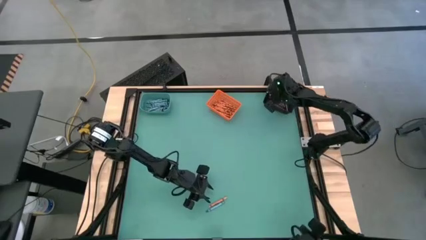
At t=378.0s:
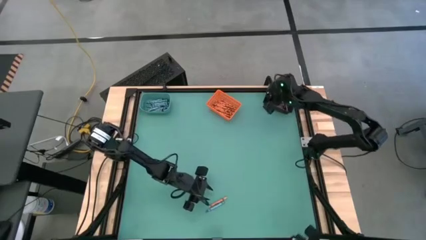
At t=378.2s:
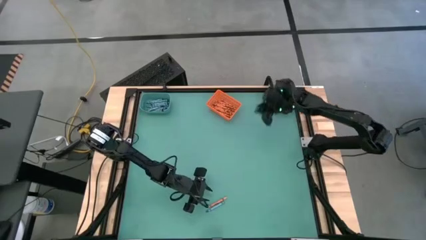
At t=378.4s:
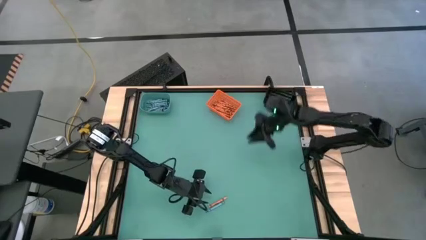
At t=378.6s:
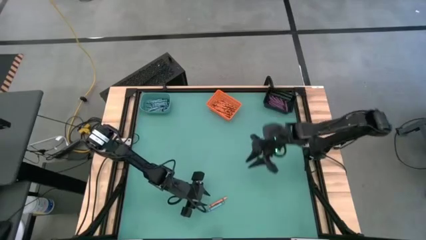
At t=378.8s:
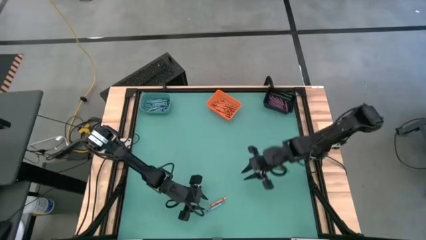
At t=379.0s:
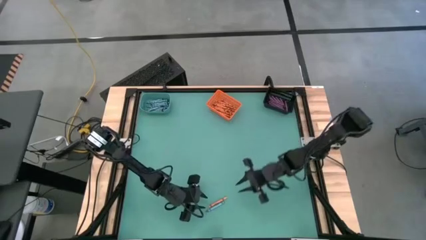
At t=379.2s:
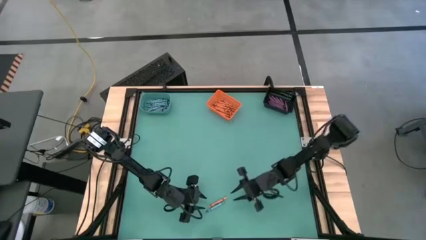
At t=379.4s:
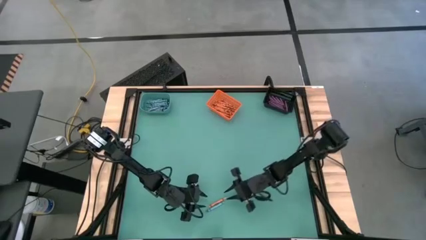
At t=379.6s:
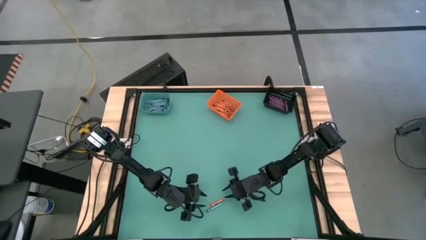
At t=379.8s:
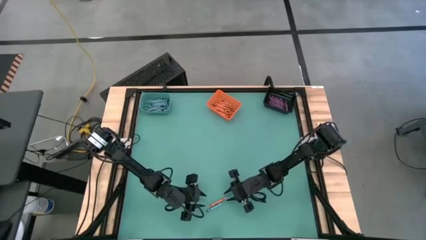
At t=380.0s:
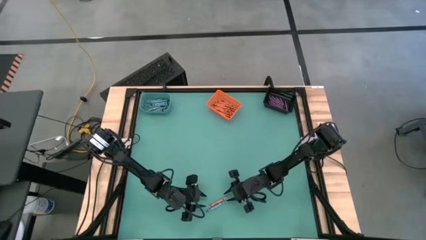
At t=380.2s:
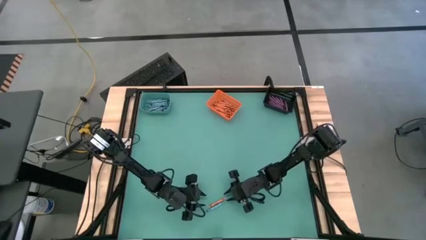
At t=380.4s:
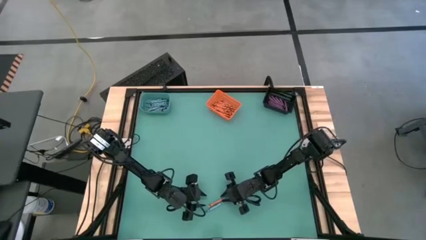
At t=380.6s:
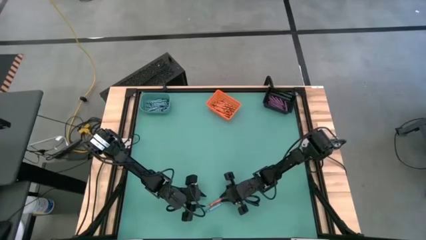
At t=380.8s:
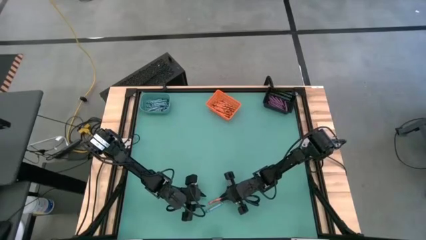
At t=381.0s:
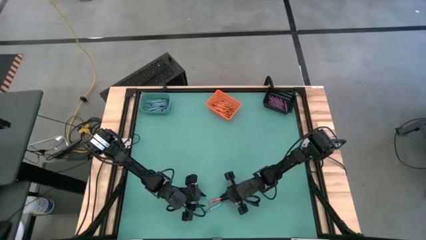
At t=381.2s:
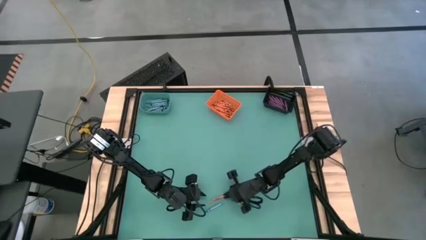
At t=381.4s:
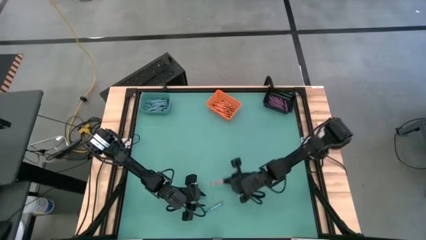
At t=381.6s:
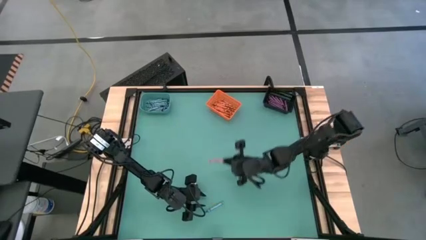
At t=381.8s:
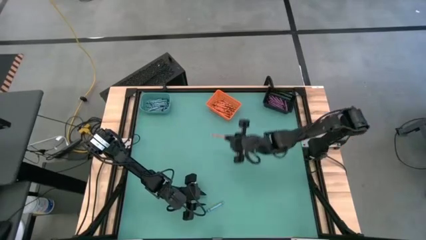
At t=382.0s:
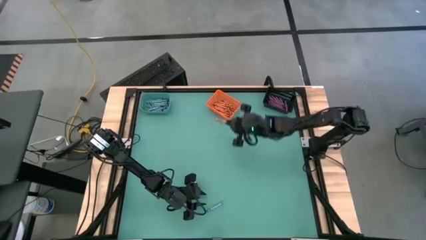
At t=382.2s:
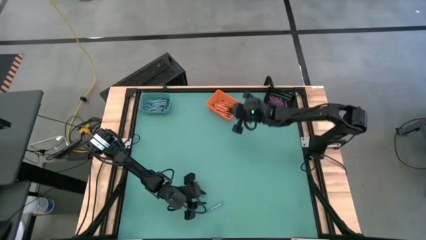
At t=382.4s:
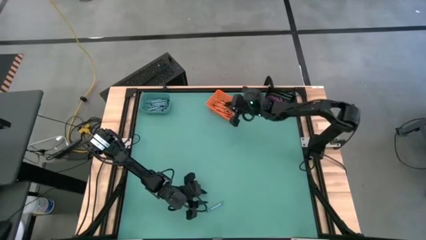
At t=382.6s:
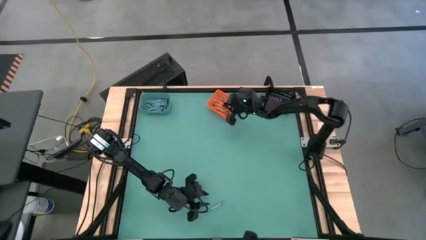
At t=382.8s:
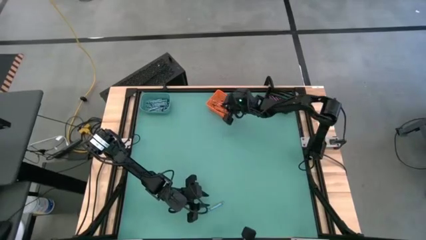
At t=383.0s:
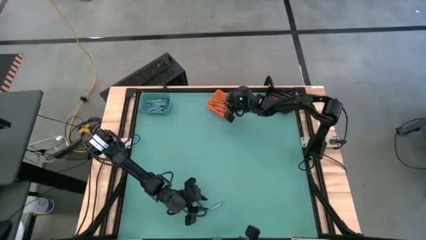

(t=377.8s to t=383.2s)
Task: Sort crayons
Put the orange crayon into the orange bin

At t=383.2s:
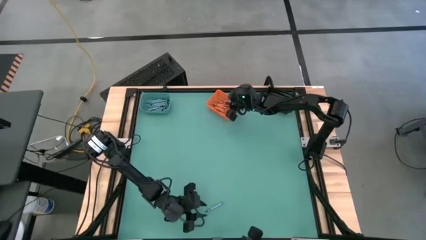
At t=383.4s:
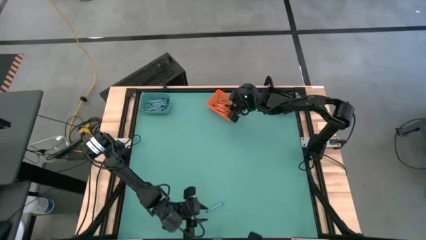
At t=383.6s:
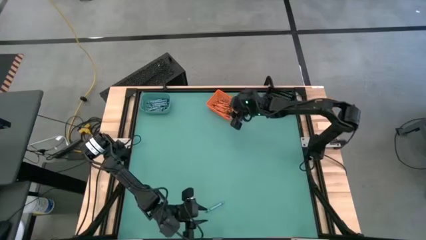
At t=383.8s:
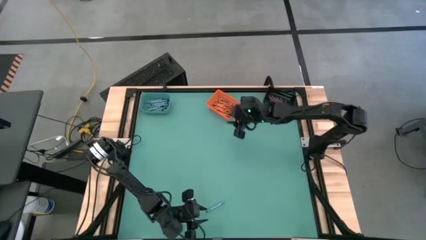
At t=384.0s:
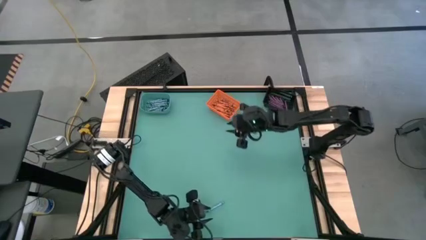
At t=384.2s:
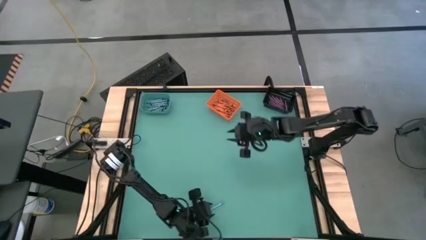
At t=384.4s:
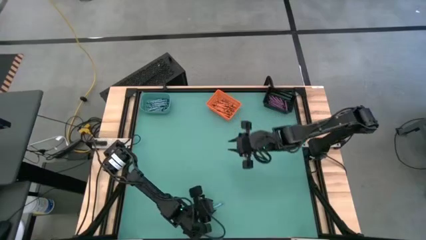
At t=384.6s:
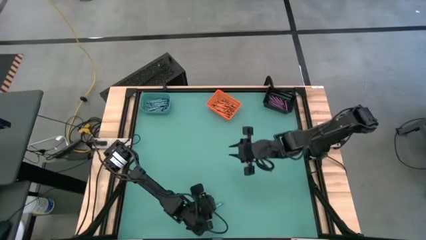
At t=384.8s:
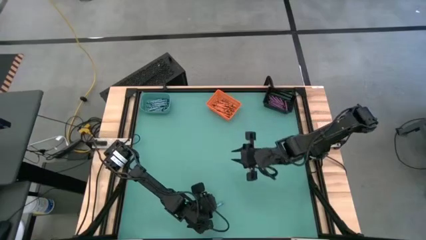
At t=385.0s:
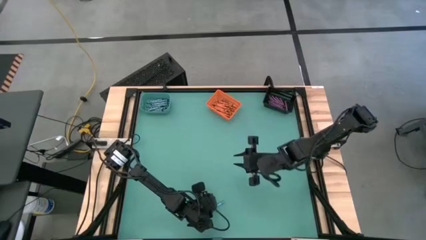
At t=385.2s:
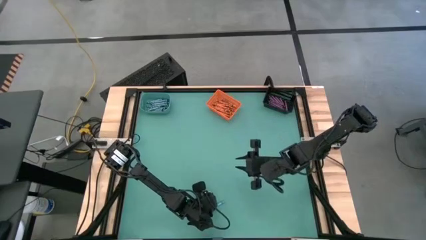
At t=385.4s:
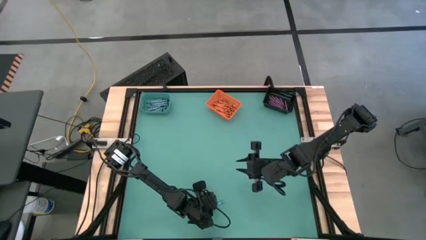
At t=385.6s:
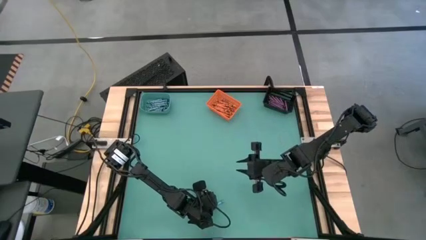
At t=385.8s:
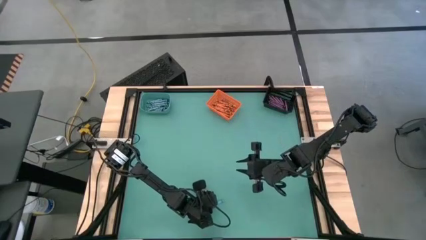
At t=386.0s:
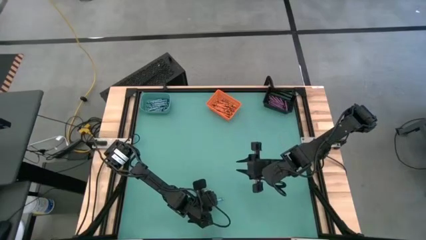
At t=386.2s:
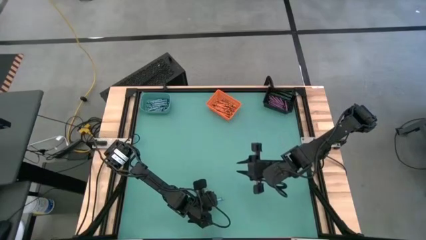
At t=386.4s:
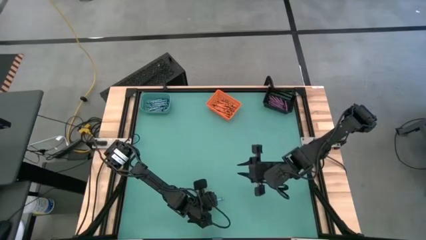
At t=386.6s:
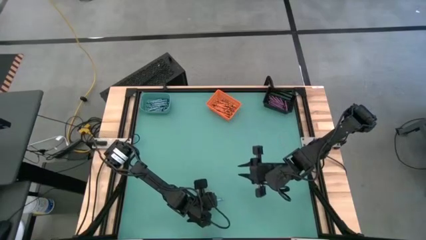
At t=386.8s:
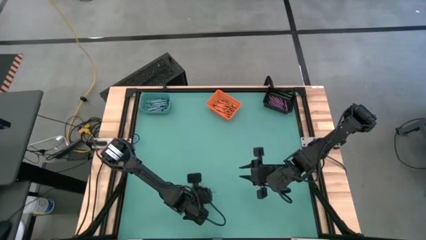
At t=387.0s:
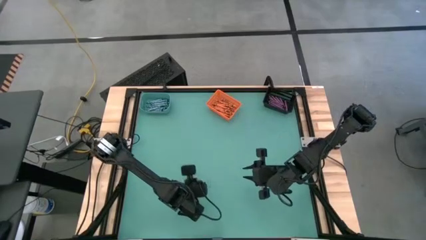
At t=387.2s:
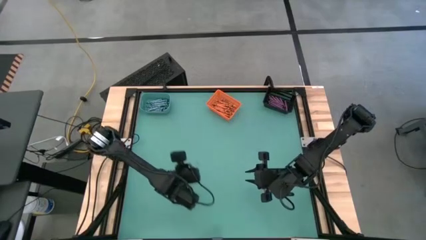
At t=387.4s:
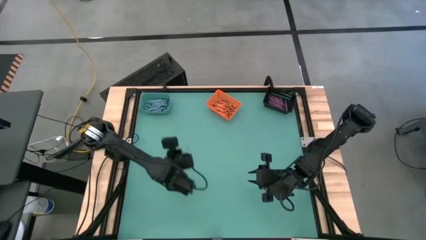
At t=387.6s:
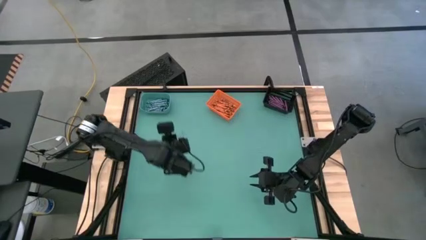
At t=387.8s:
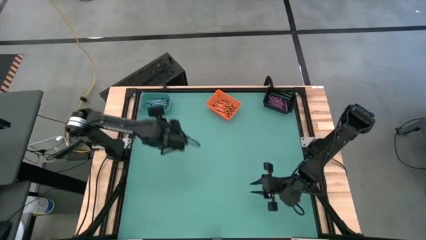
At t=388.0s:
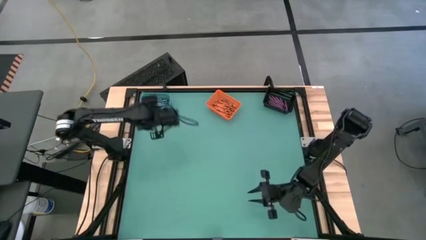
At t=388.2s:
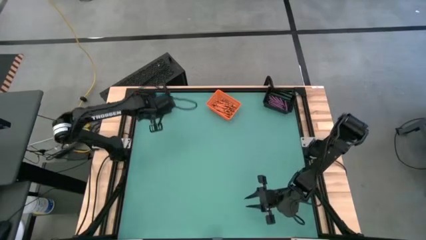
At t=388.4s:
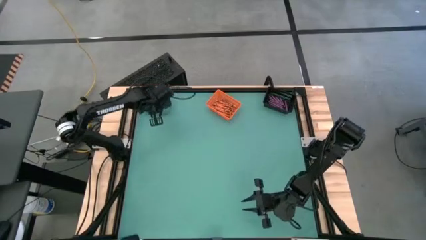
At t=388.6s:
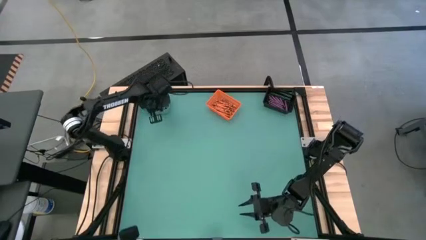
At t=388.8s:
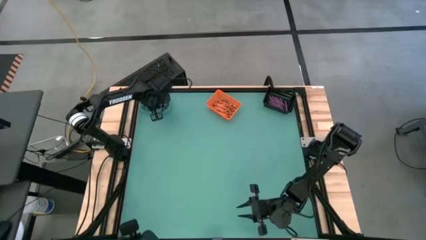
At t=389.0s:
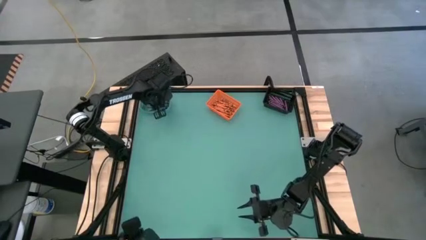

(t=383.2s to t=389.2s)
Put the blue crayon into the blue bin

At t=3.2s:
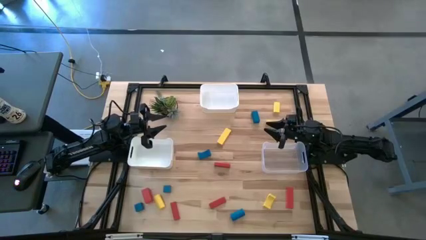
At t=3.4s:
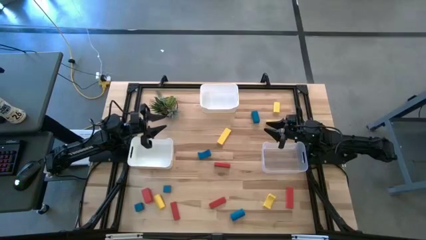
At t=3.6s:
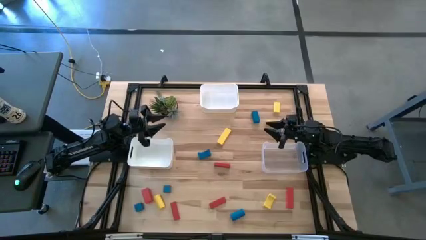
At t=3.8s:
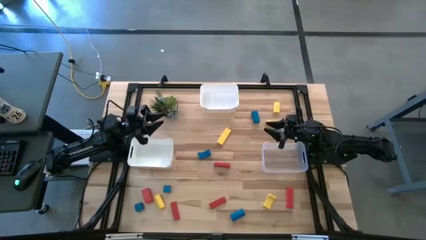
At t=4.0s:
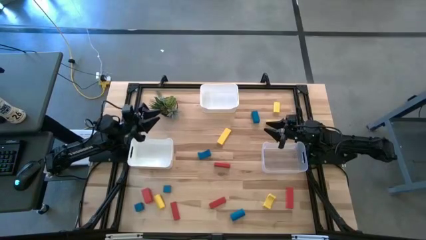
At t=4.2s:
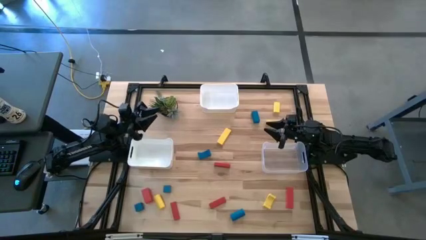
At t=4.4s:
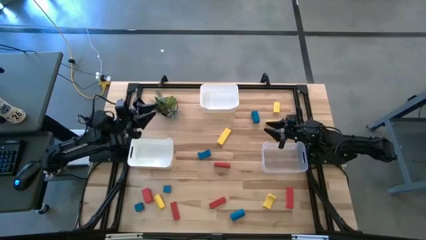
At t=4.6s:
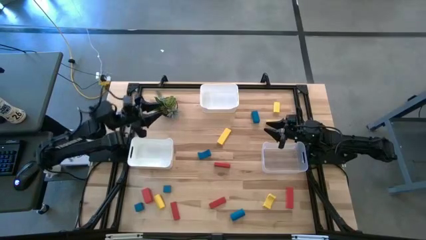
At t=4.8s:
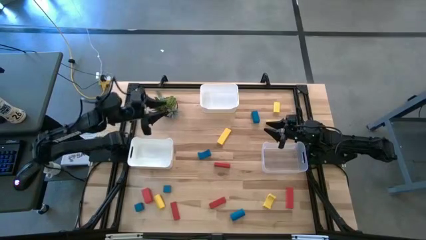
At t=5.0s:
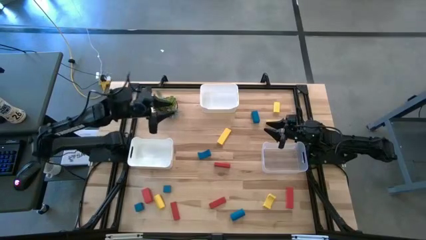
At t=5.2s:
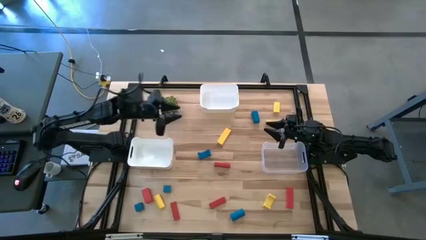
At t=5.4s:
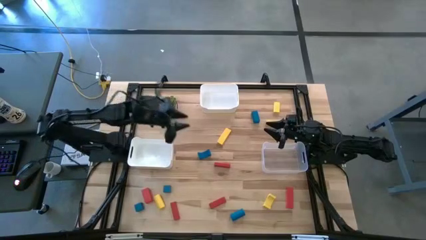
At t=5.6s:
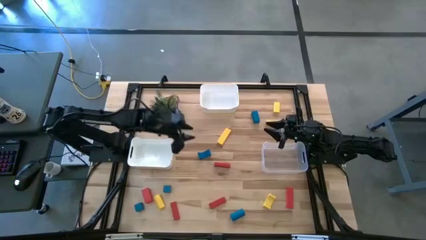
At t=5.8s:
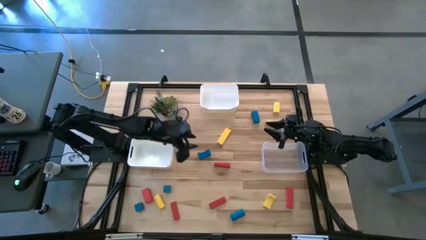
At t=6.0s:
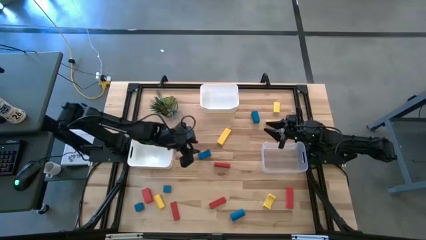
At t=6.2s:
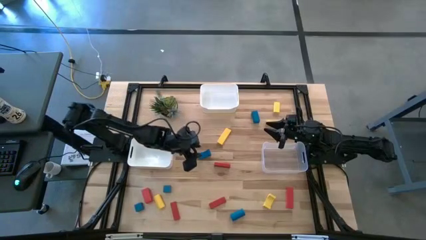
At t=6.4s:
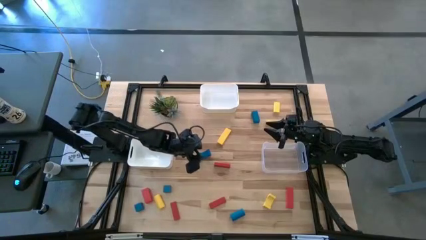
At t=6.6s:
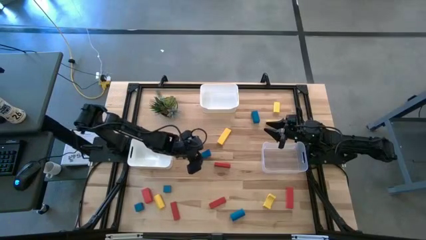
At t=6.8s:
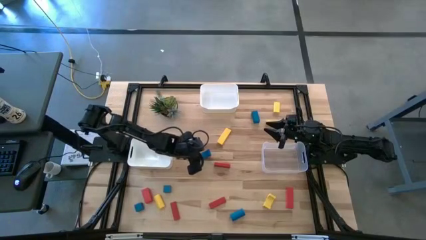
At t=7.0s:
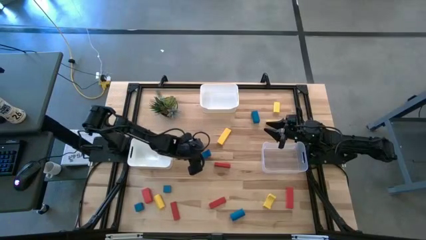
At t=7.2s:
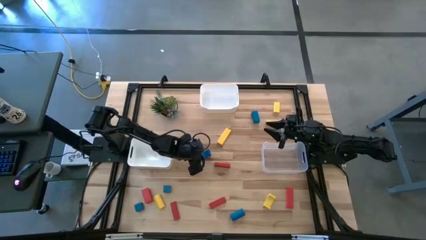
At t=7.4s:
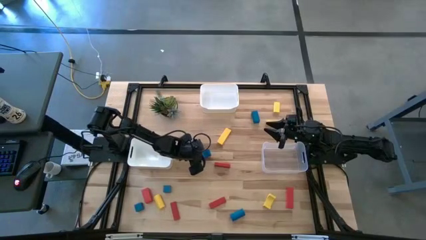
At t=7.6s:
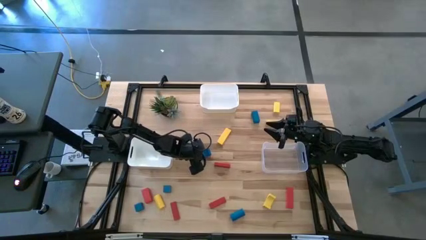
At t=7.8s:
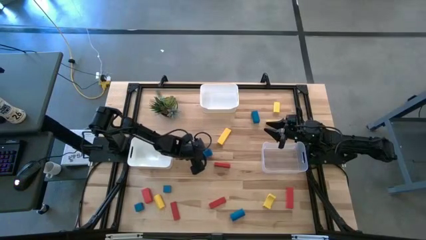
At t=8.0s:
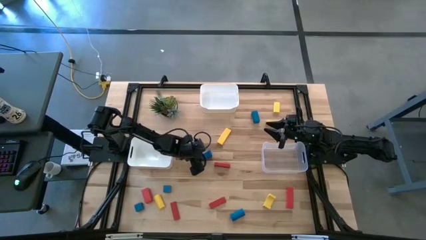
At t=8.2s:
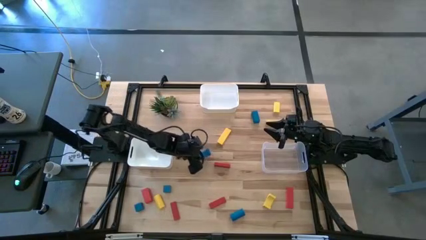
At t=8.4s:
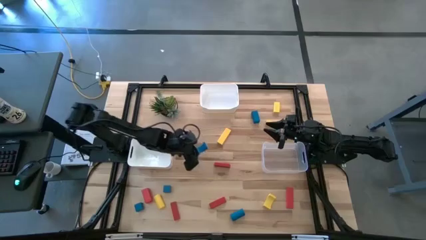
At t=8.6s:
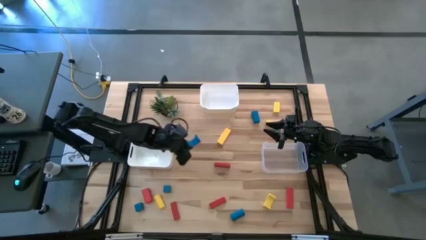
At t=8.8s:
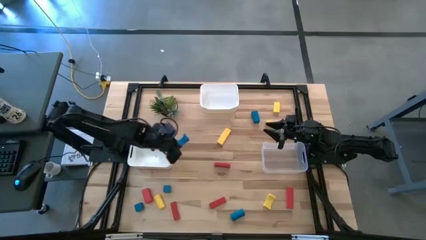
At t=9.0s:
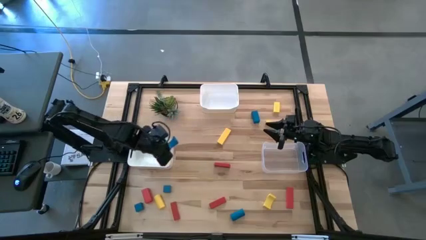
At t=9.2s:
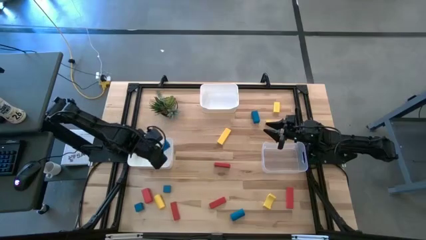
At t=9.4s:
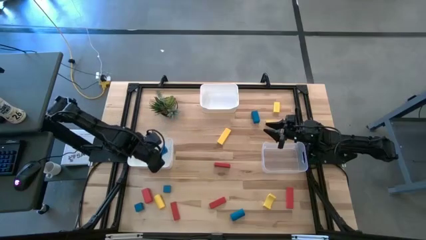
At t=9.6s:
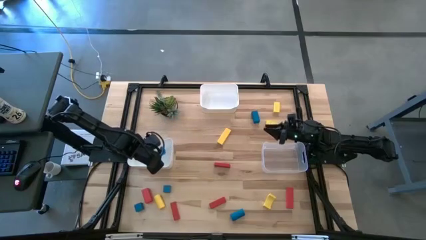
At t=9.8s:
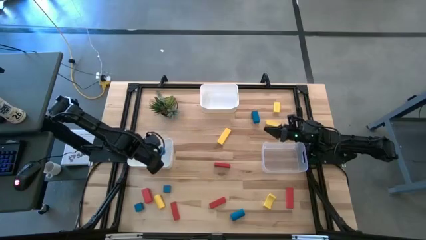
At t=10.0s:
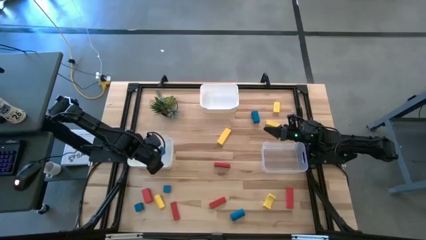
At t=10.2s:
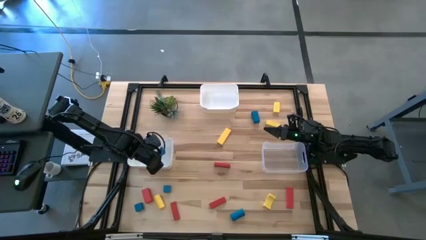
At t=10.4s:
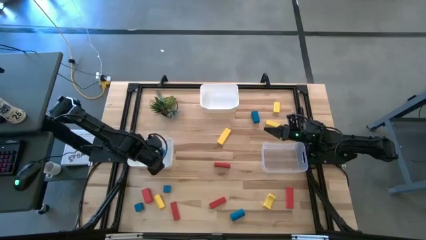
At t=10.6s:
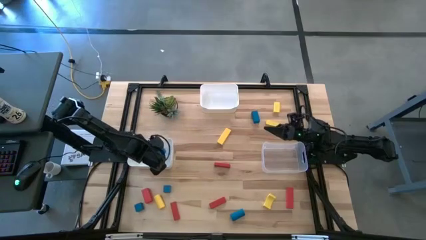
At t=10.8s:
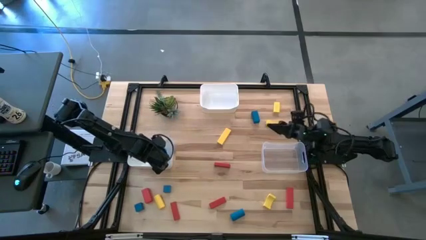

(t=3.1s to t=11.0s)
Task: Sort & place blocks by color
Put the center blue block into the bottom left white bin
